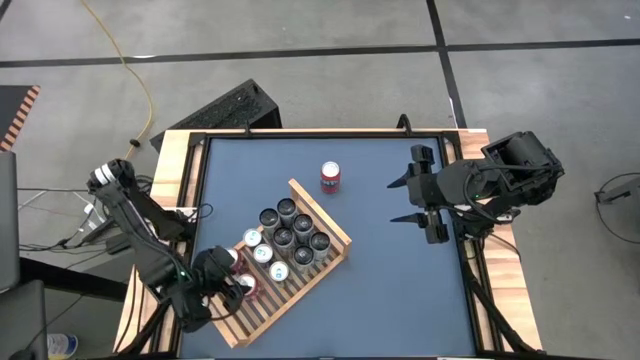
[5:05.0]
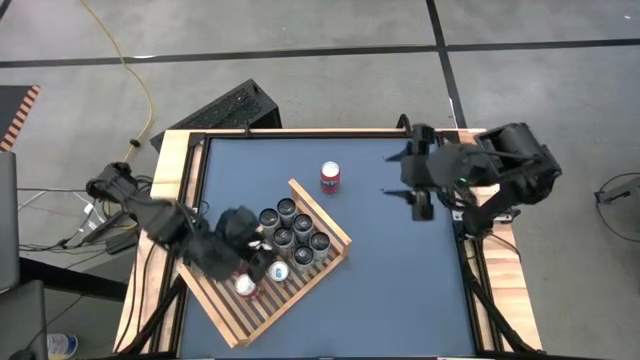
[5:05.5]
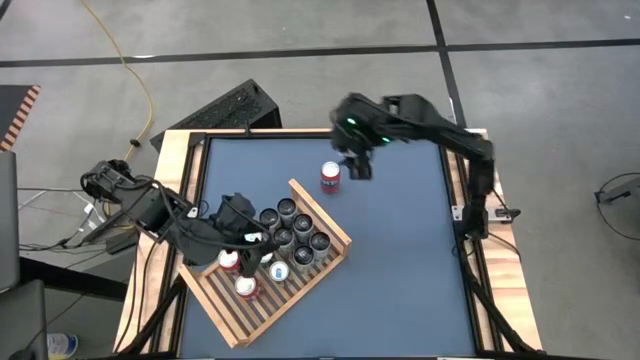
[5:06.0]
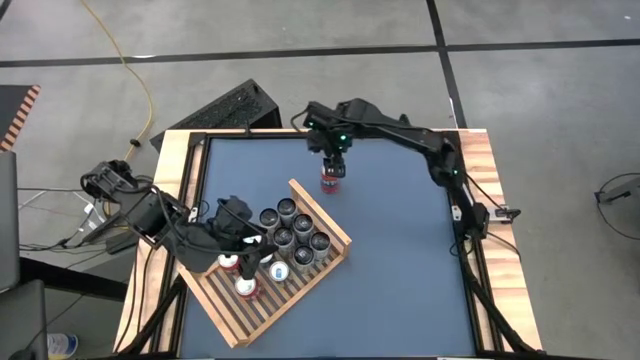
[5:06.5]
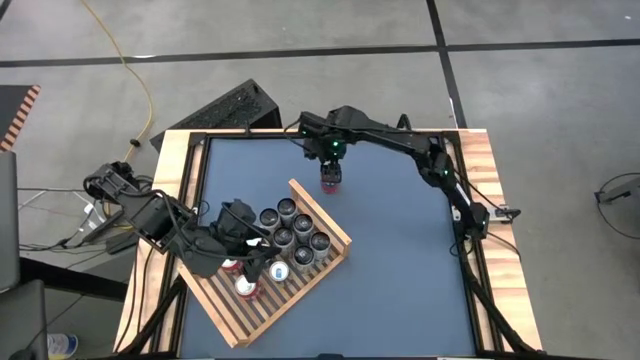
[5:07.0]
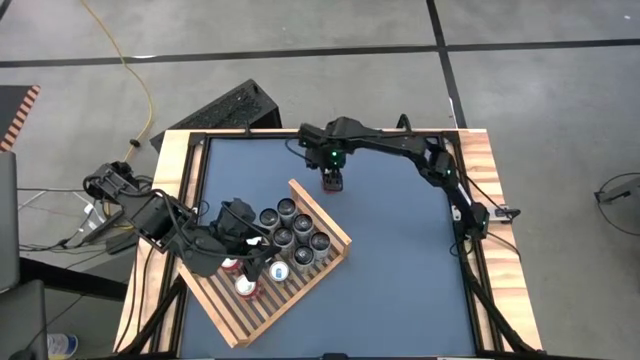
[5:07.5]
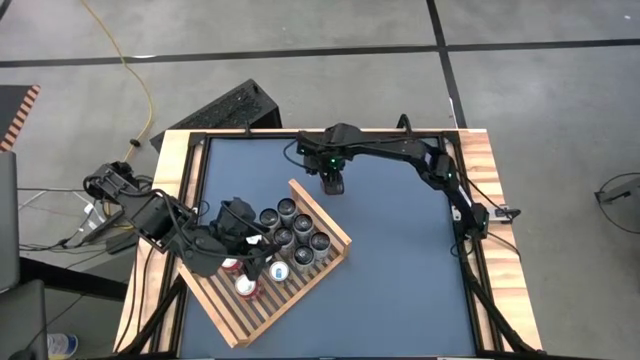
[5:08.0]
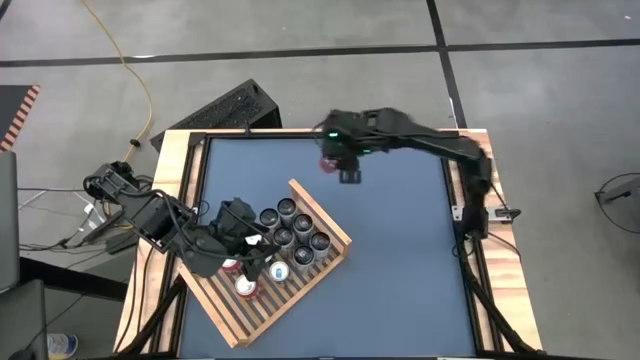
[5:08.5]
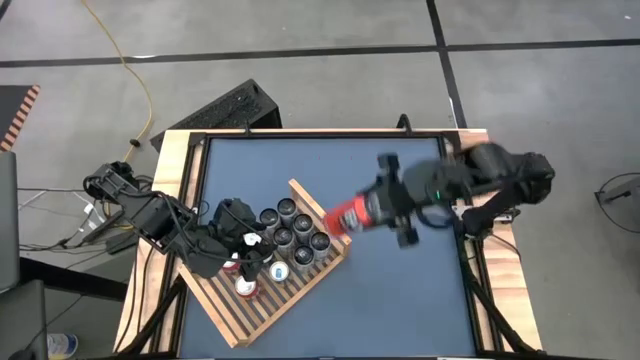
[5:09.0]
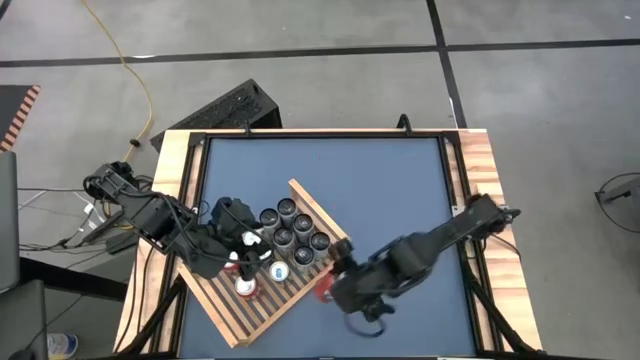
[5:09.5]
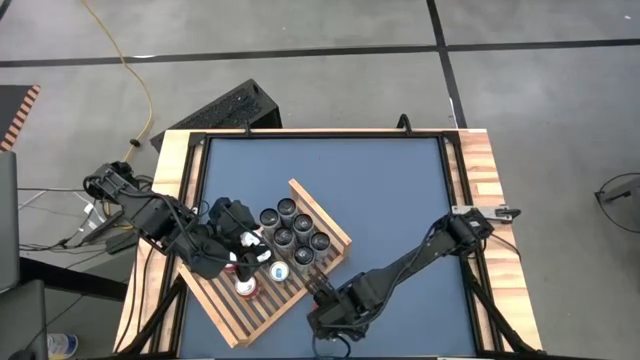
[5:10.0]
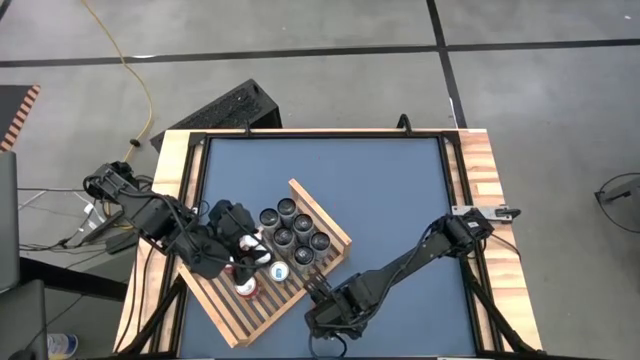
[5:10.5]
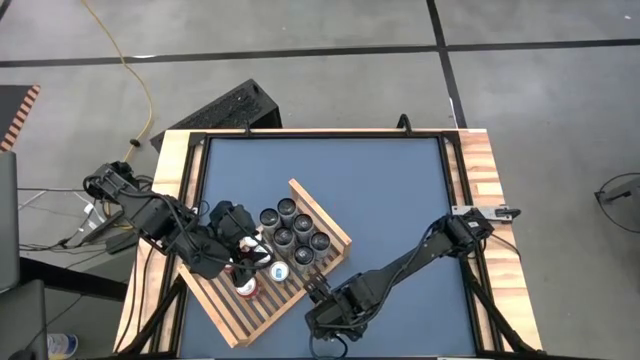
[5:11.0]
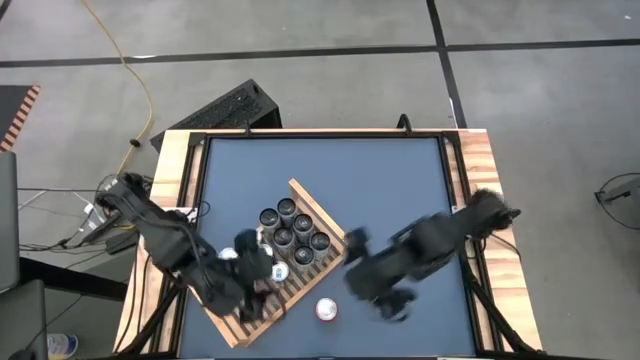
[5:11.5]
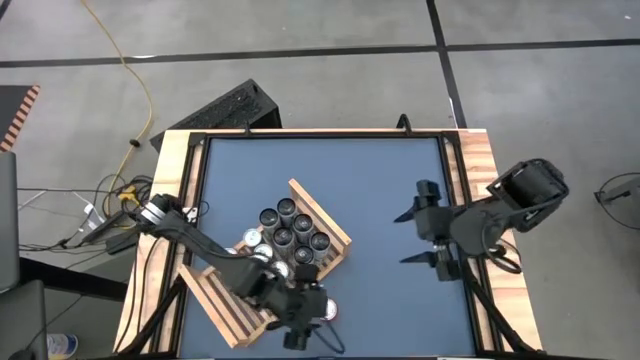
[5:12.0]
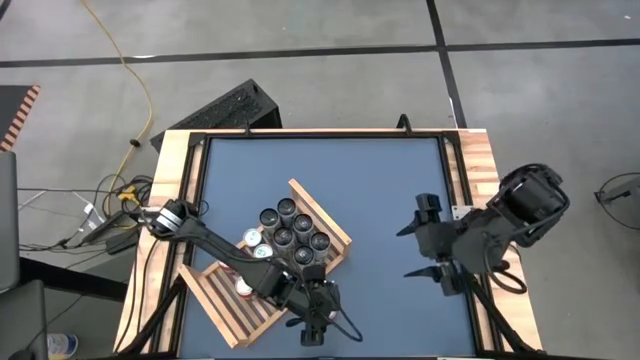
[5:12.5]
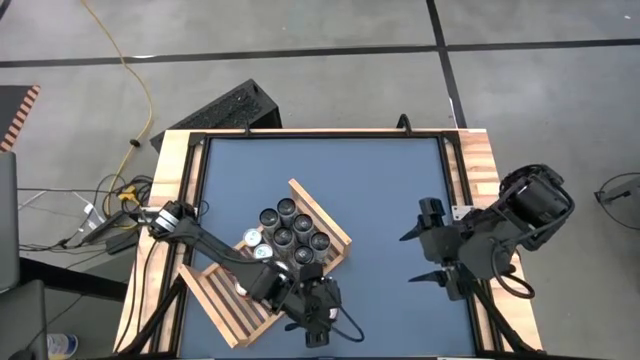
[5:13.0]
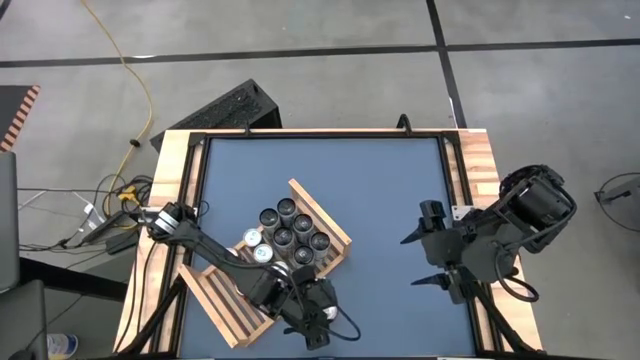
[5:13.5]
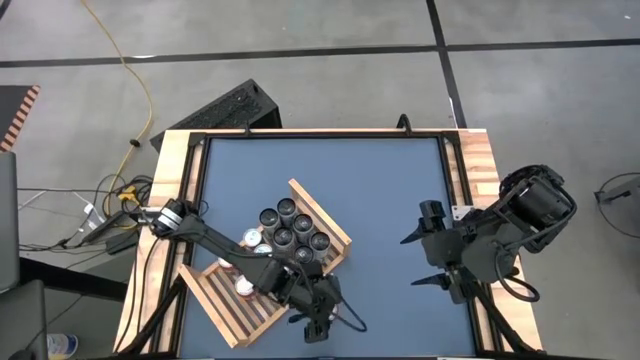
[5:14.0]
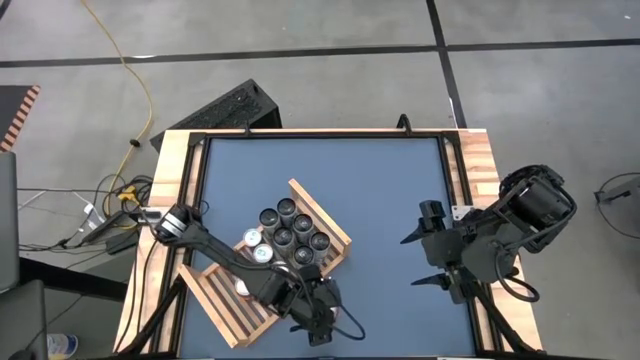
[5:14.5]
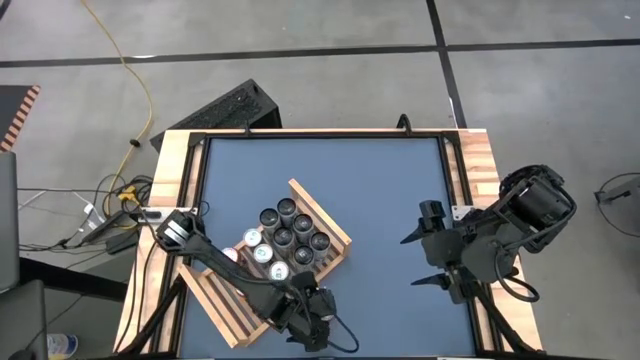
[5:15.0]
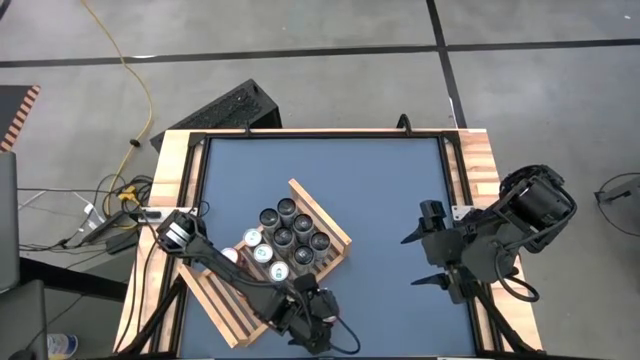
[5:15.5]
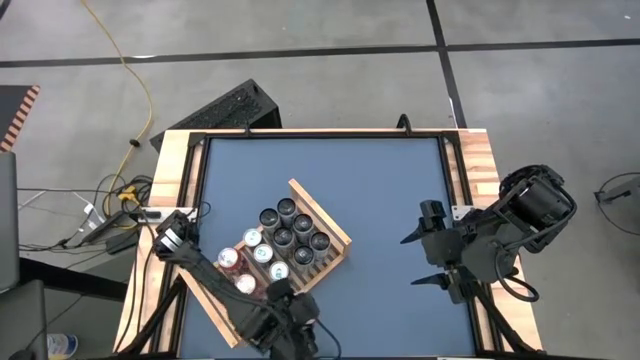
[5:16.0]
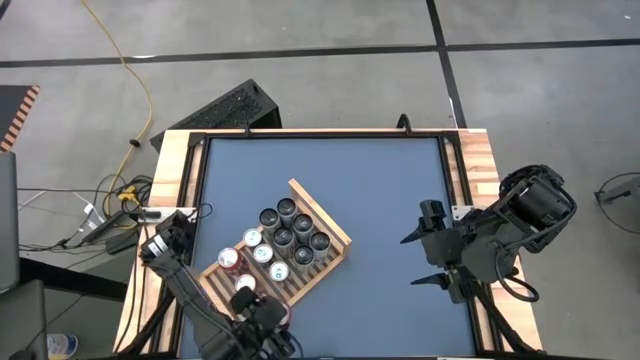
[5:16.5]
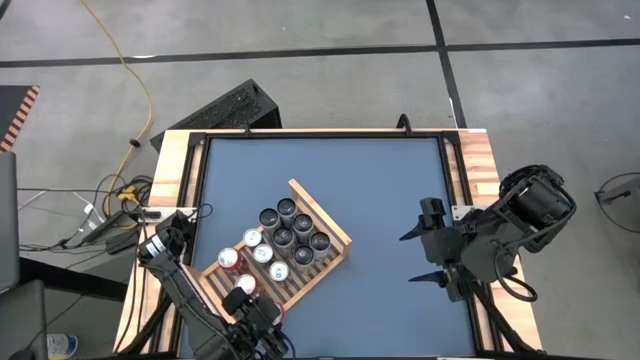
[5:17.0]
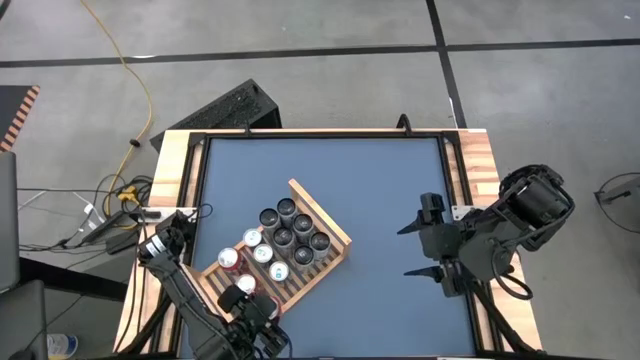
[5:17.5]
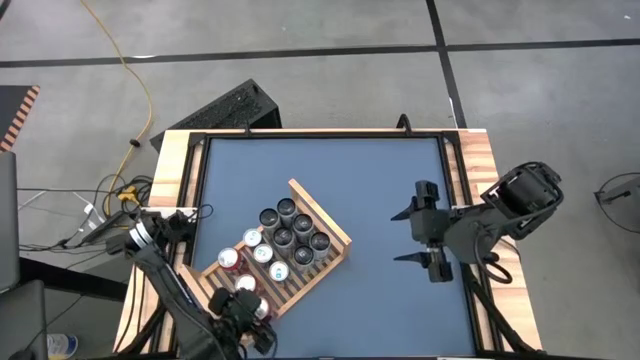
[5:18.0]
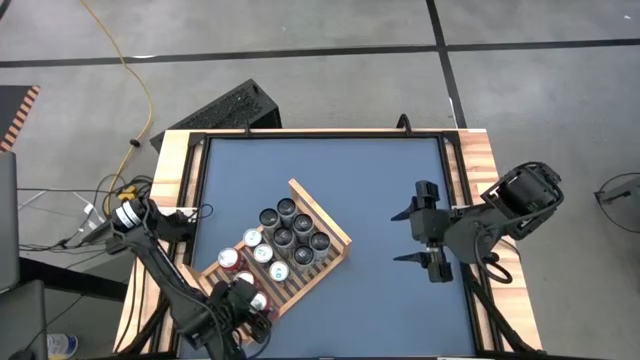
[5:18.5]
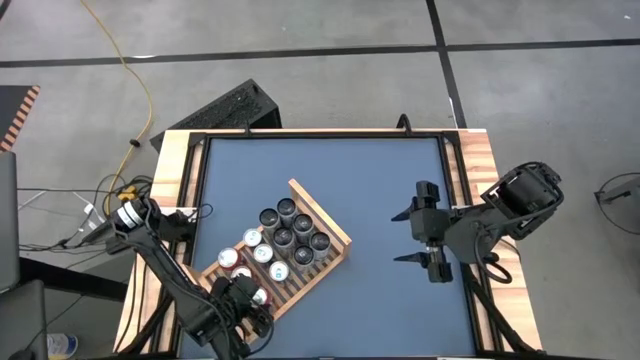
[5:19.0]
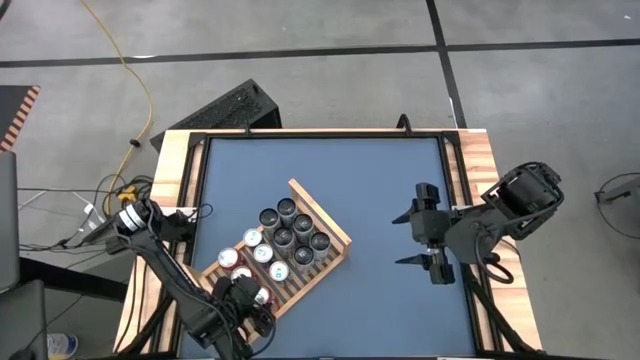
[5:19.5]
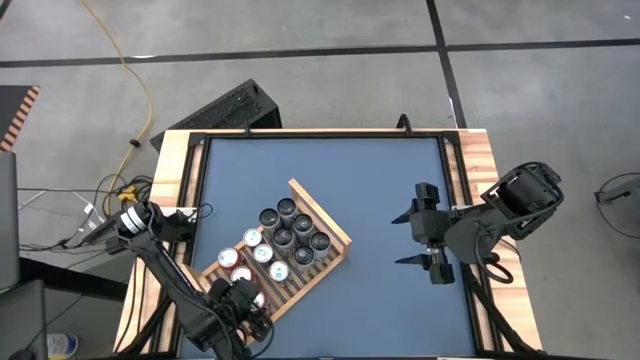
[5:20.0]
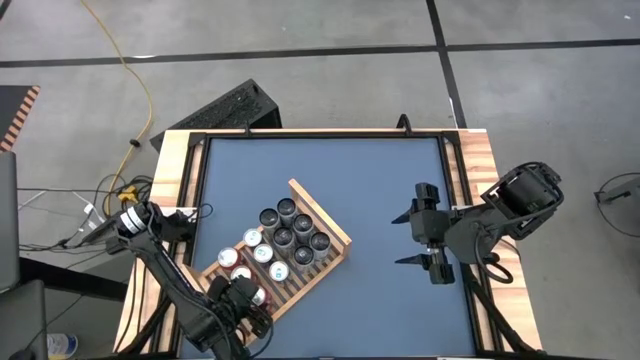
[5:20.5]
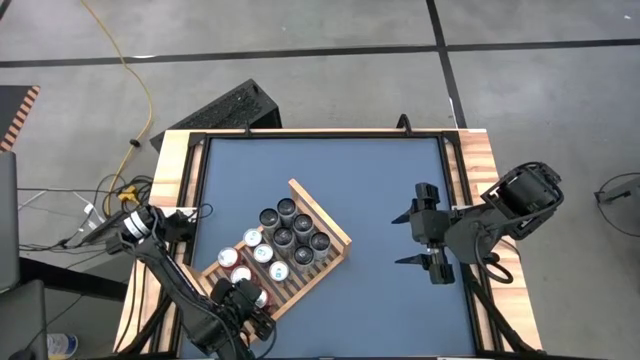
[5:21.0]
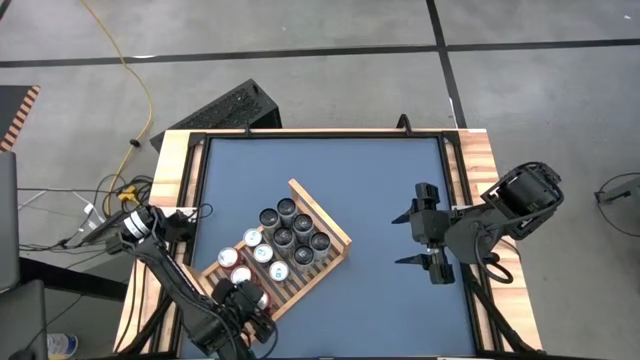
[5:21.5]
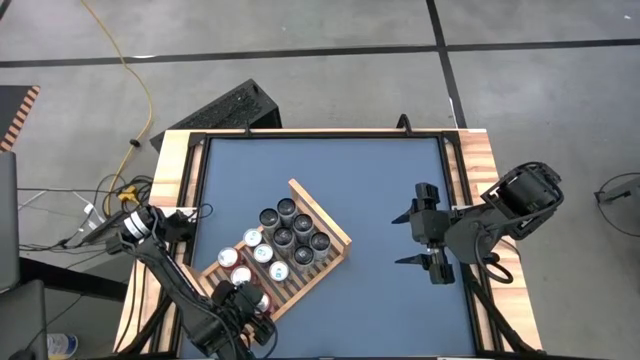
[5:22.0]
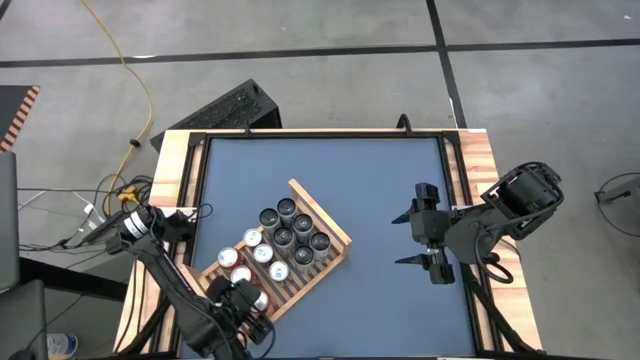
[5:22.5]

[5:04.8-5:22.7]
Task: Place canned beverage on shelf
Put the red soda can on the shelf aligned with the other red soda cans

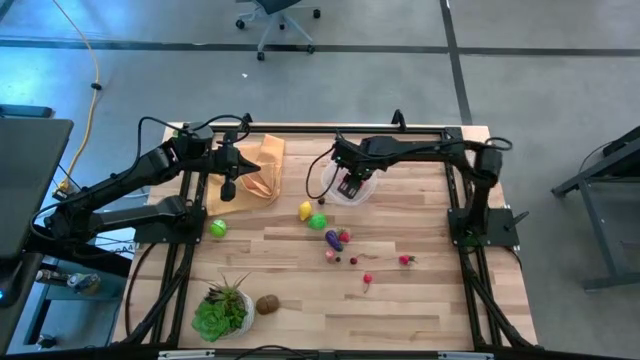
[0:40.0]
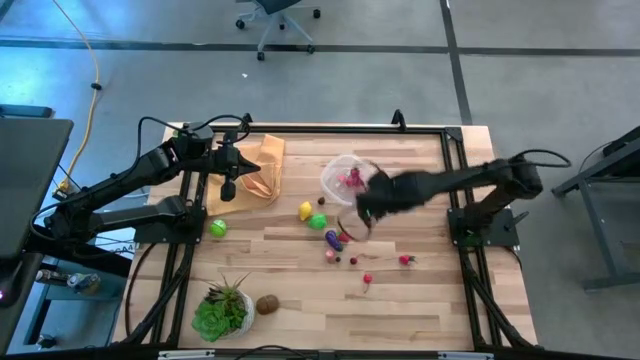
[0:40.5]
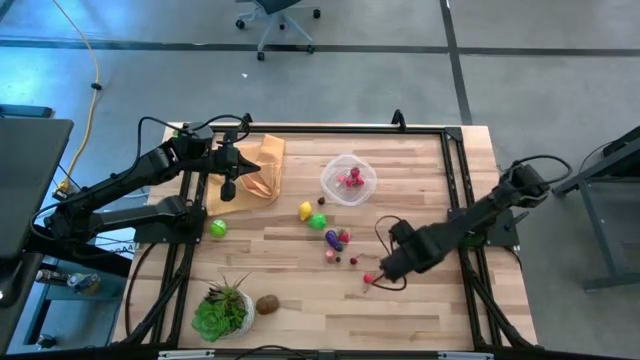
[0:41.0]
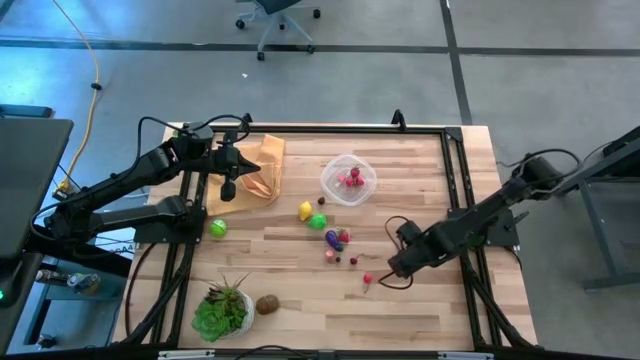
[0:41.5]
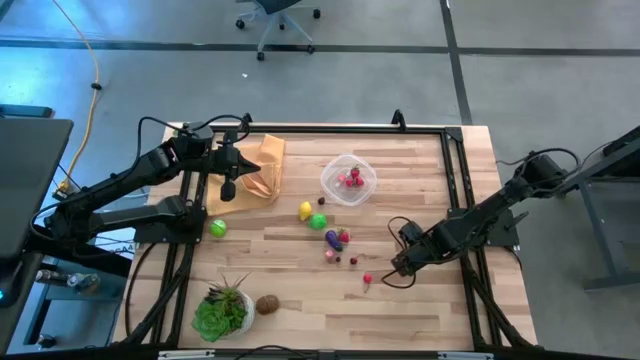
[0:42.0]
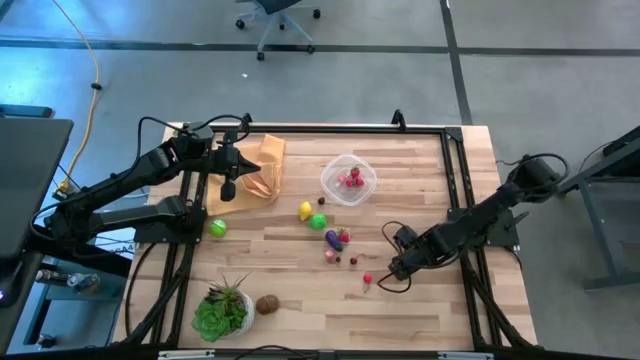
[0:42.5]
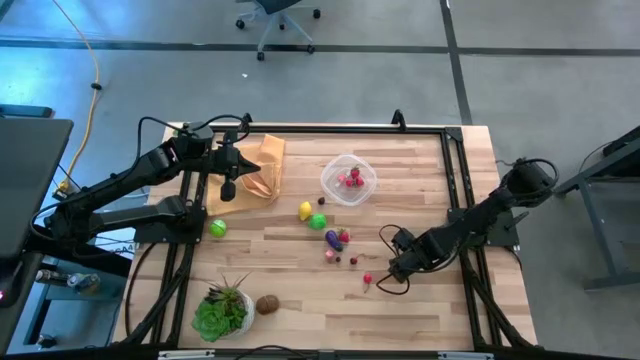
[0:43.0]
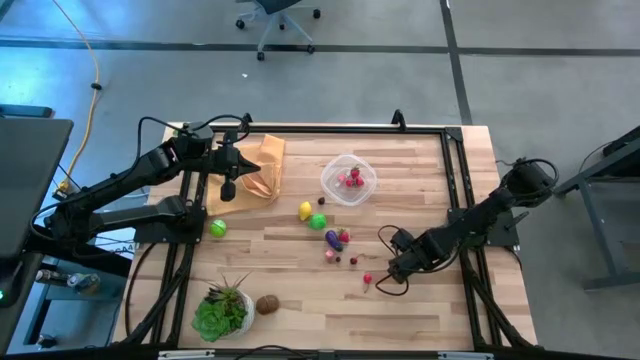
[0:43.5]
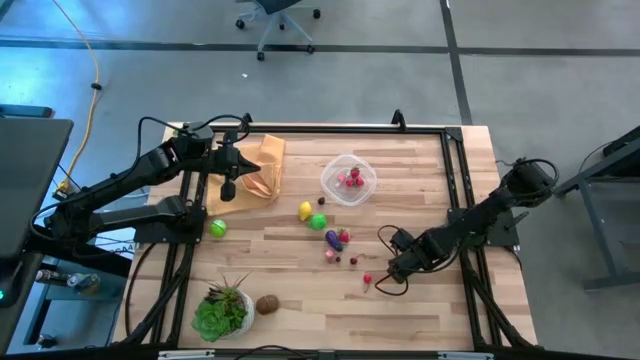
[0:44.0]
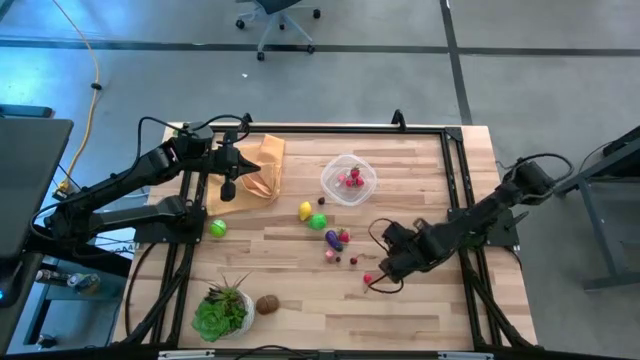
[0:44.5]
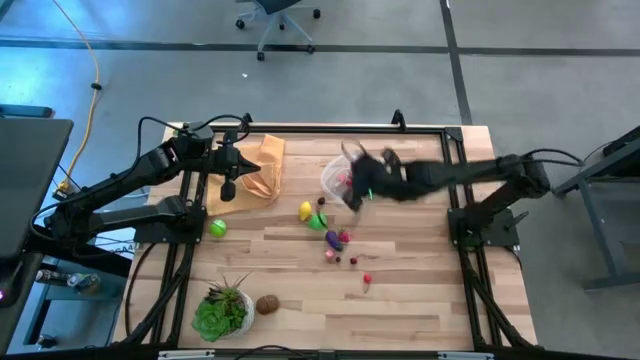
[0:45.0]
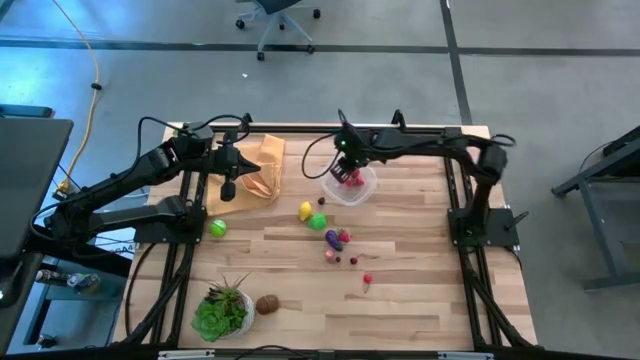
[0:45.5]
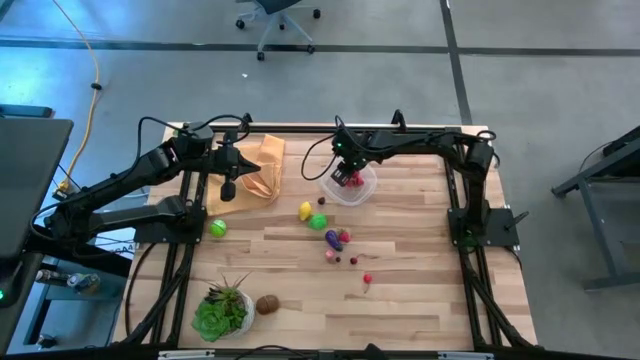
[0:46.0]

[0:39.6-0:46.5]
Task: Pick and placing Produce into tupperware
Put the red strawberry into the transparent container
